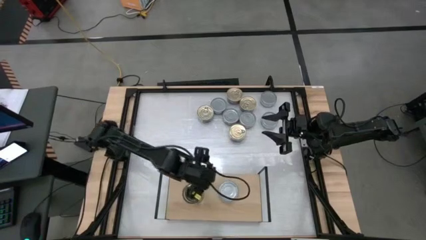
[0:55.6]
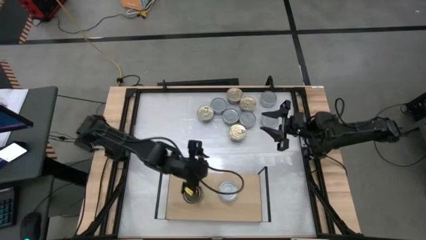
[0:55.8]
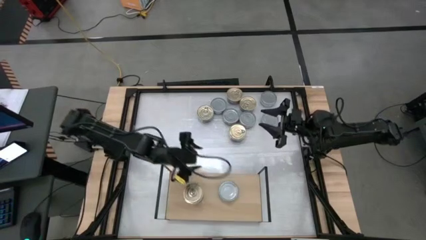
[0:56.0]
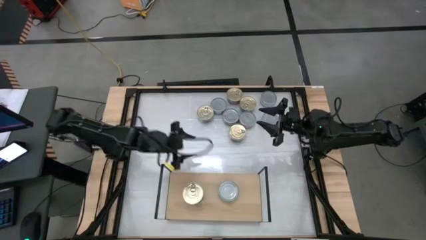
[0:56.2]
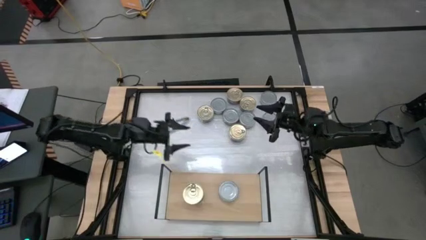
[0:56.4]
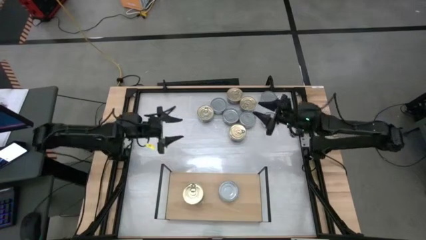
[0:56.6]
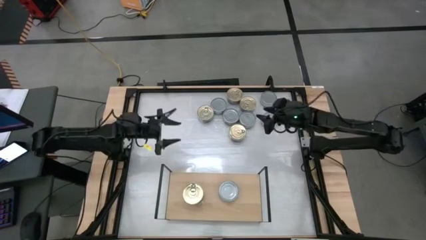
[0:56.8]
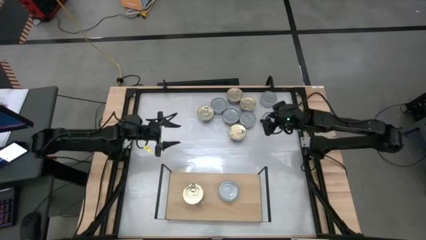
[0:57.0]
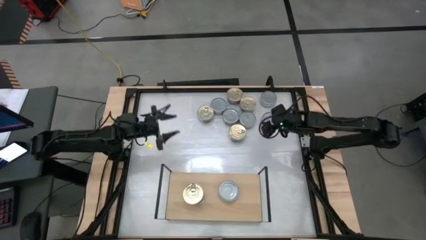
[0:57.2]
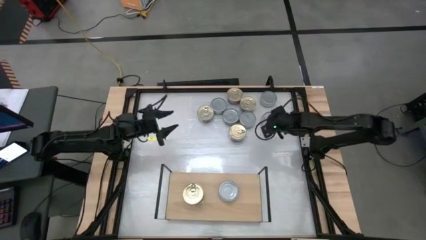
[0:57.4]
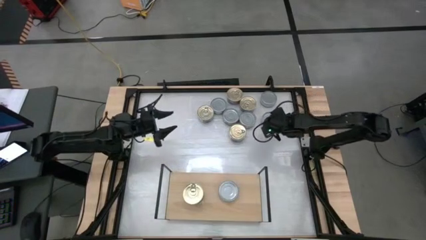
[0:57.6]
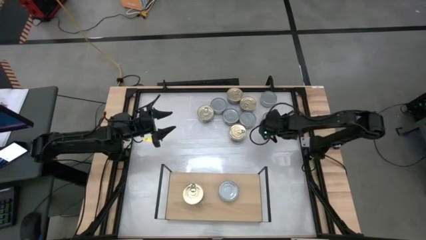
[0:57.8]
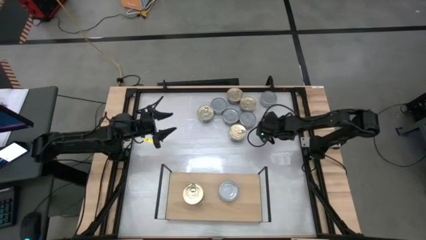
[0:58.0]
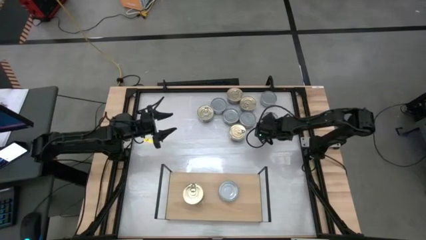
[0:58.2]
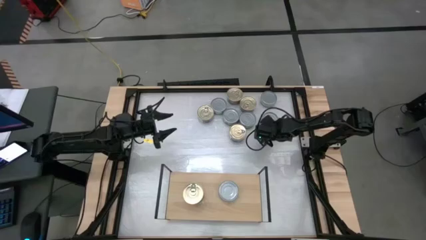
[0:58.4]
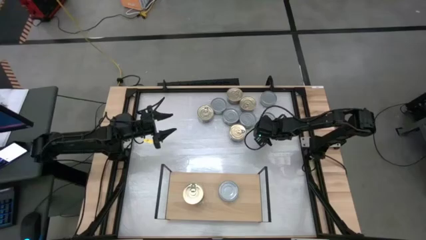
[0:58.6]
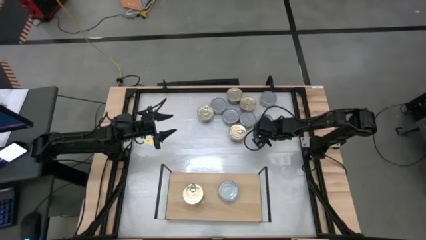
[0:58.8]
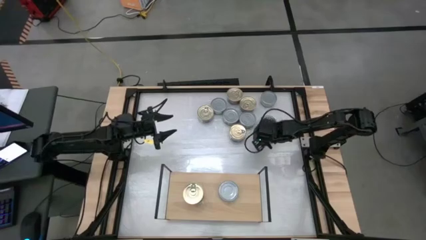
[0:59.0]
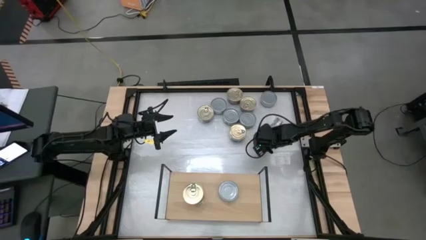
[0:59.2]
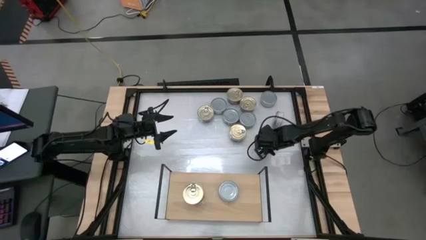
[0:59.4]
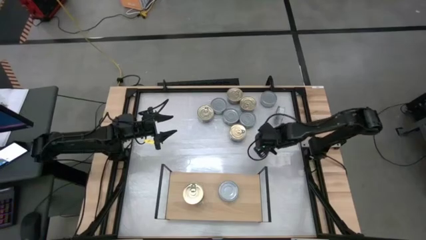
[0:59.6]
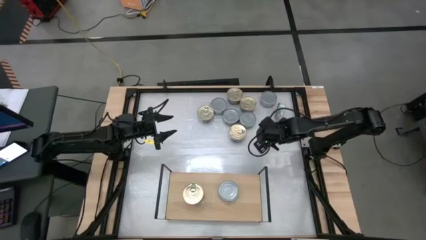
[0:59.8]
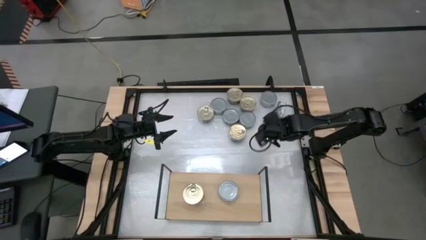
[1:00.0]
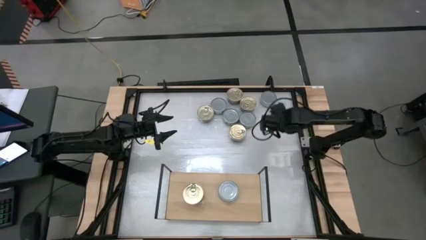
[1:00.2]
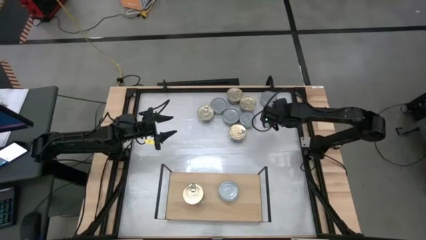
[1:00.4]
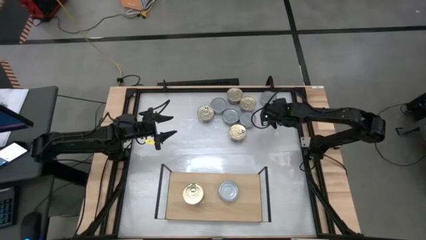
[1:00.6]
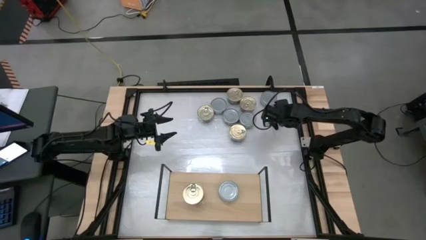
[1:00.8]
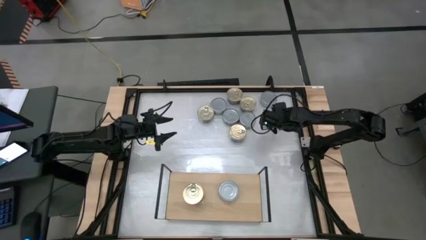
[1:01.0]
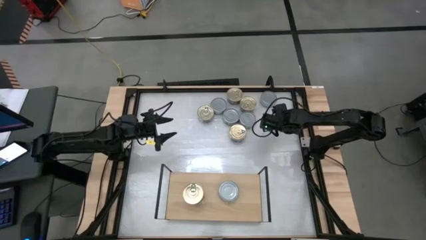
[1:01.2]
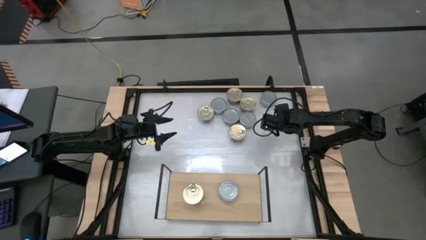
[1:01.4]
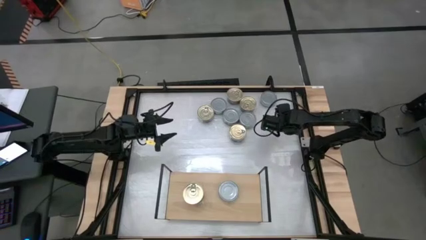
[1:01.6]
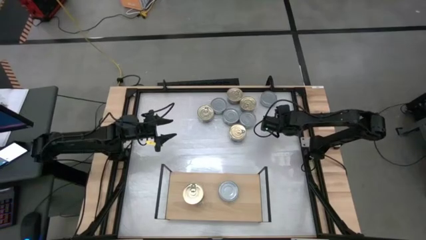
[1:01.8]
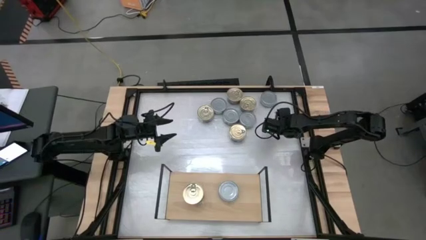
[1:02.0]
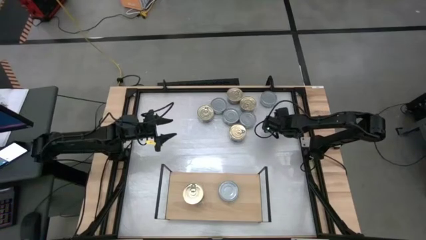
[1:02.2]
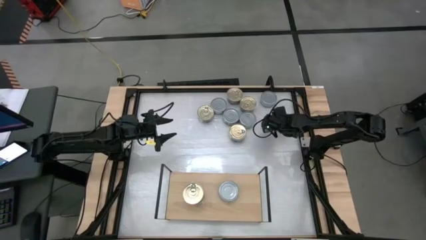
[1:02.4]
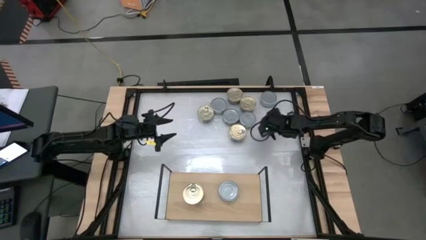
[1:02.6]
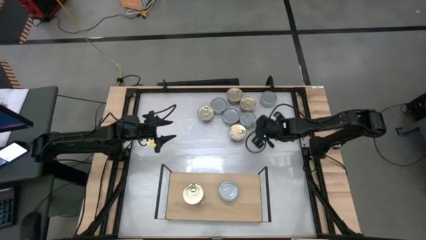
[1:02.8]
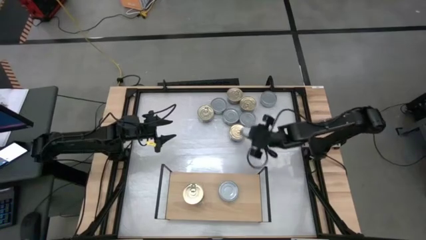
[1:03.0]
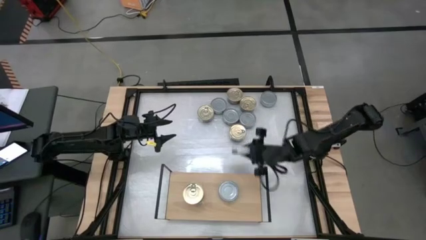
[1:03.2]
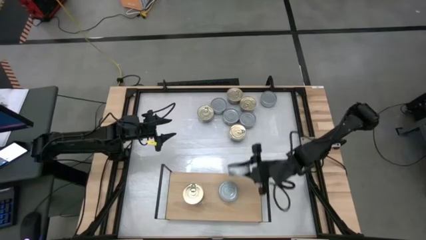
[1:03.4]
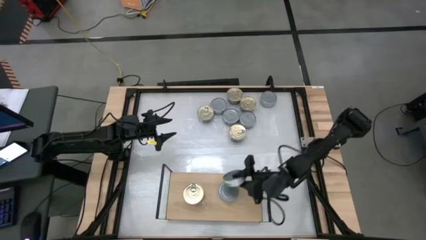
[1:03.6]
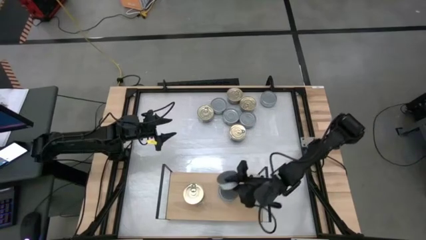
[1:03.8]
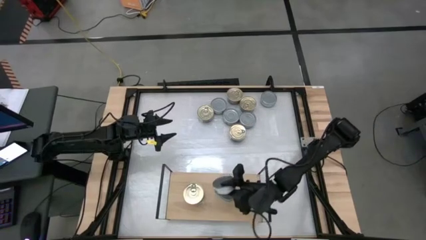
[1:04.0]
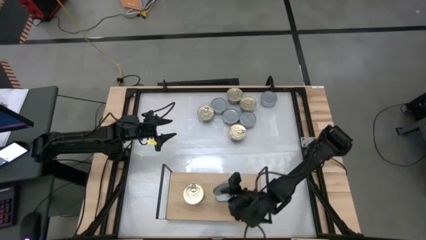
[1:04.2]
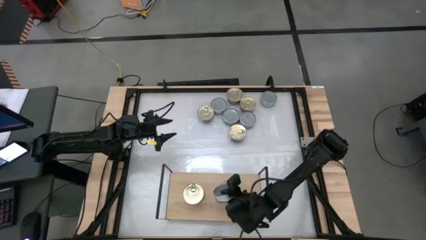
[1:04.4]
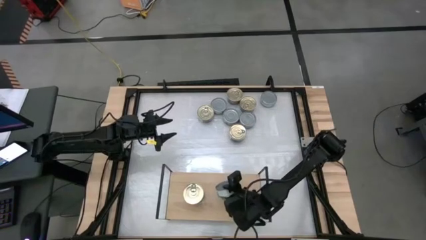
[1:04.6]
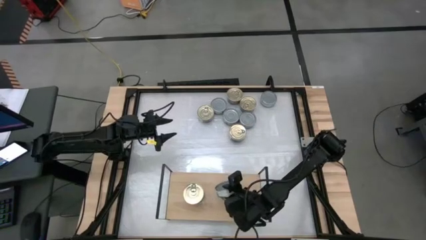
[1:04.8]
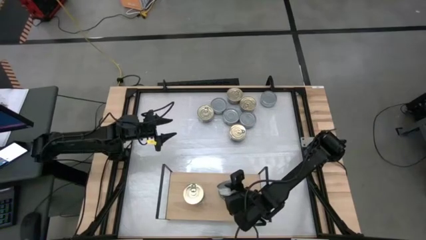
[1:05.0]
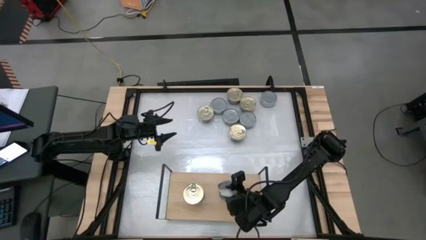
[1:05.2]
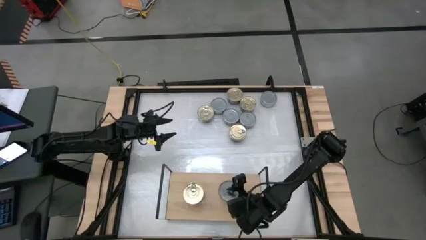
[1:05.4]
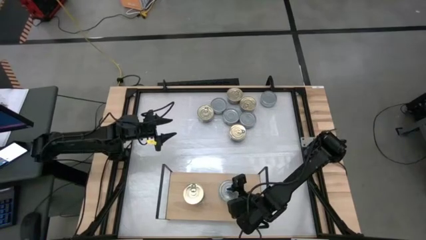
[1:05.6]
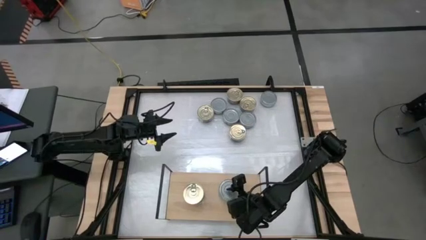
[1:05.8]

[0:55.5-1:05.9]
Task: Stack canned seafood by type on shelf
Stack the green tuna can on top of the green tuna can on the shelf

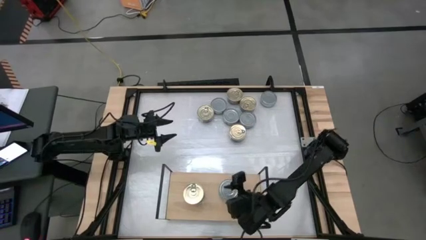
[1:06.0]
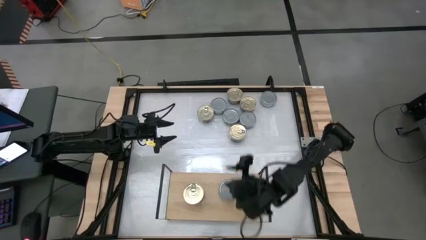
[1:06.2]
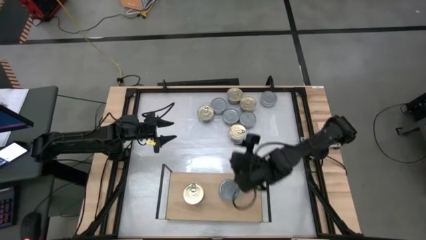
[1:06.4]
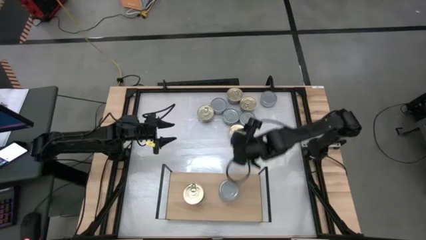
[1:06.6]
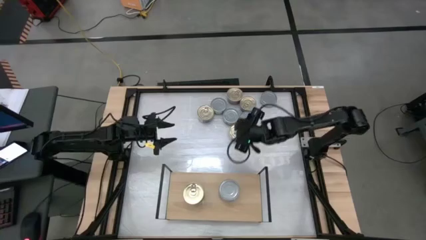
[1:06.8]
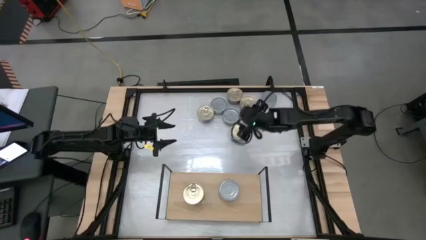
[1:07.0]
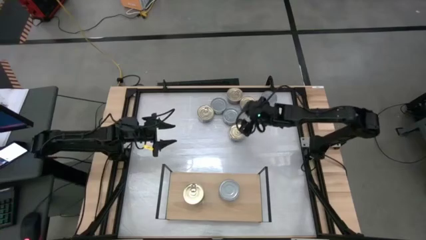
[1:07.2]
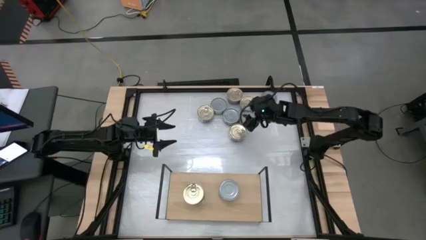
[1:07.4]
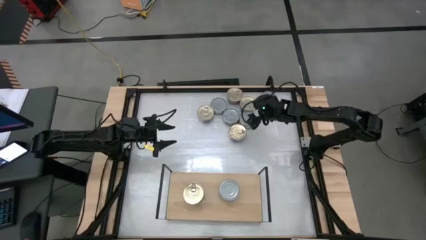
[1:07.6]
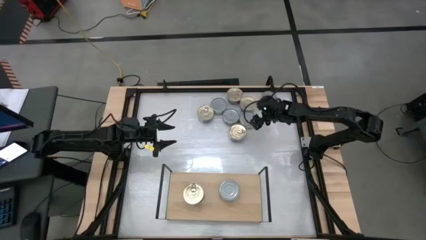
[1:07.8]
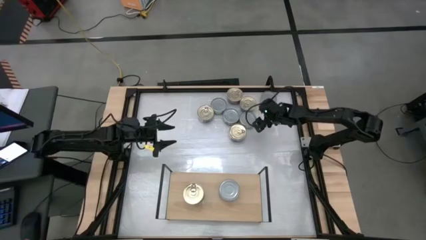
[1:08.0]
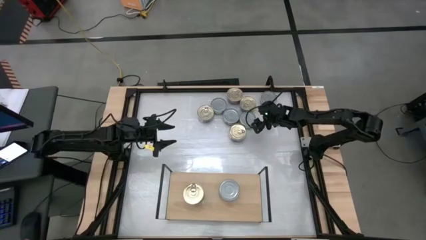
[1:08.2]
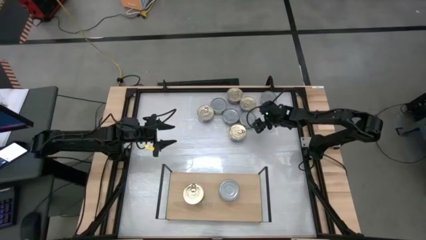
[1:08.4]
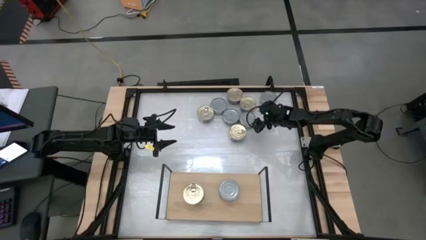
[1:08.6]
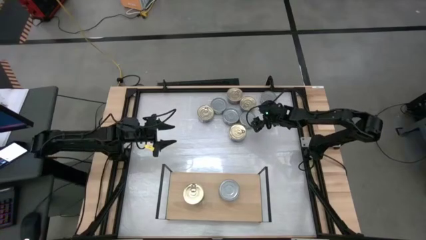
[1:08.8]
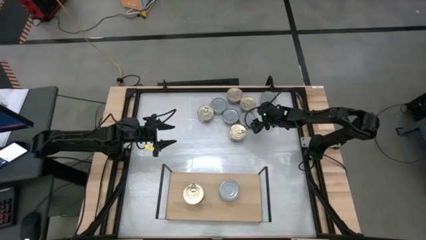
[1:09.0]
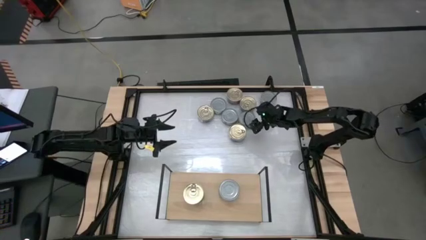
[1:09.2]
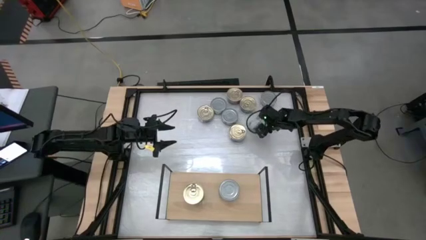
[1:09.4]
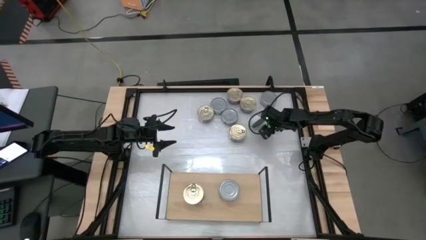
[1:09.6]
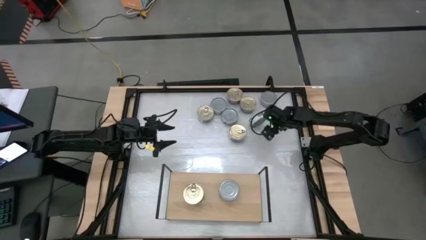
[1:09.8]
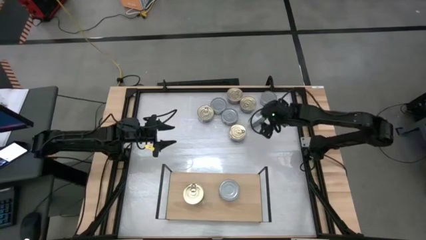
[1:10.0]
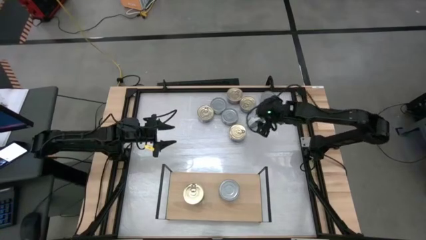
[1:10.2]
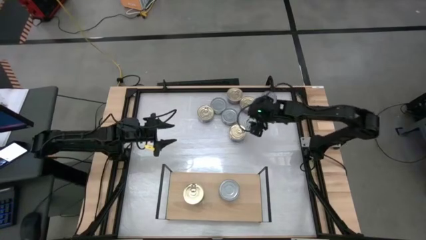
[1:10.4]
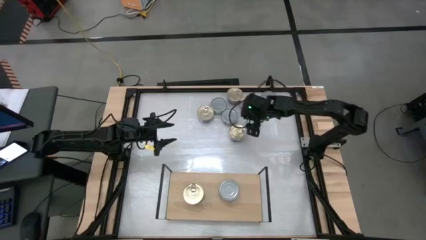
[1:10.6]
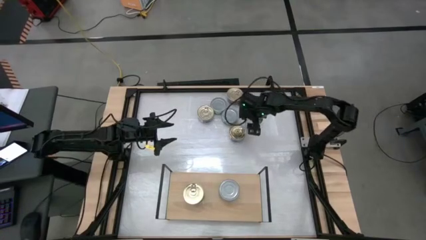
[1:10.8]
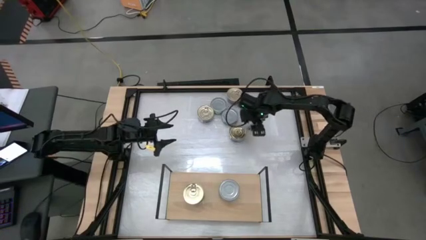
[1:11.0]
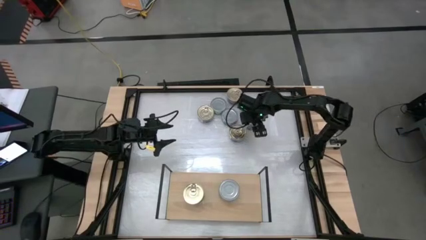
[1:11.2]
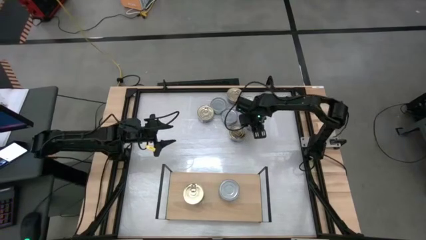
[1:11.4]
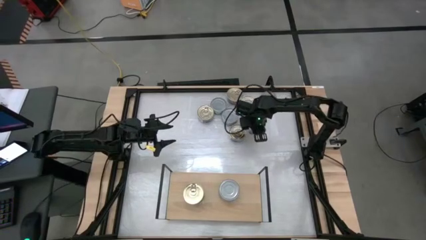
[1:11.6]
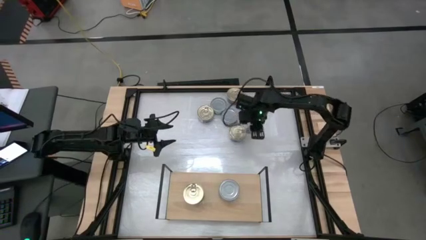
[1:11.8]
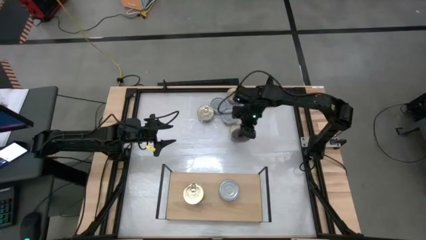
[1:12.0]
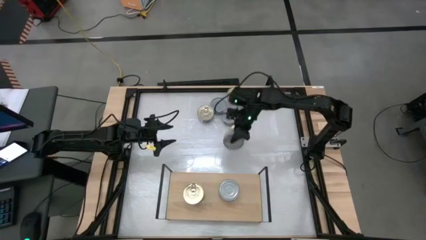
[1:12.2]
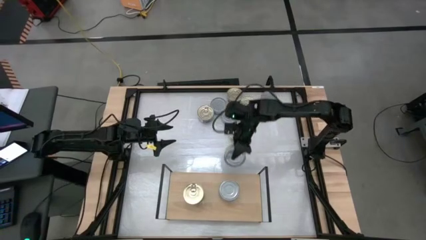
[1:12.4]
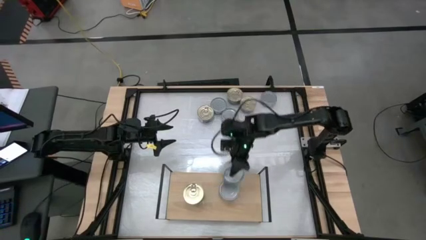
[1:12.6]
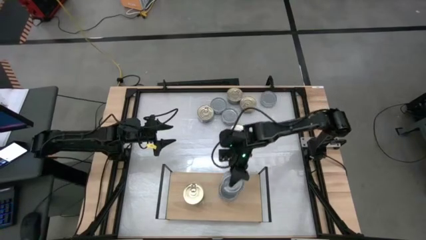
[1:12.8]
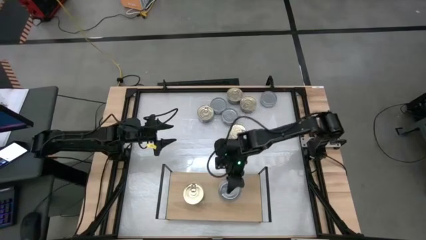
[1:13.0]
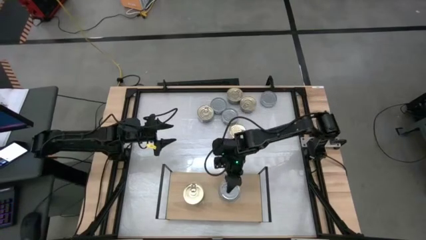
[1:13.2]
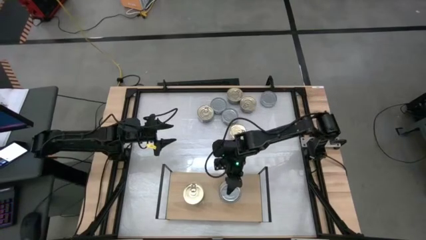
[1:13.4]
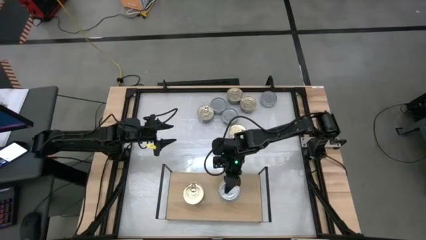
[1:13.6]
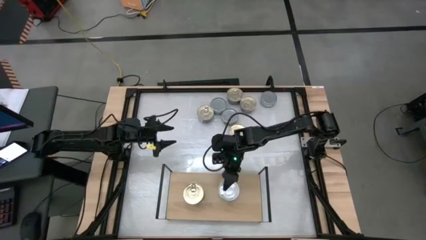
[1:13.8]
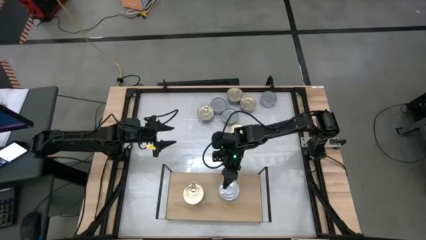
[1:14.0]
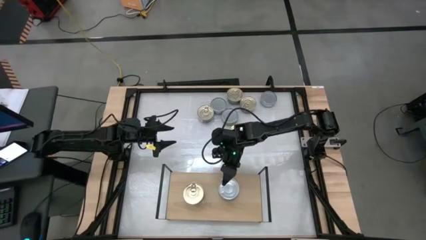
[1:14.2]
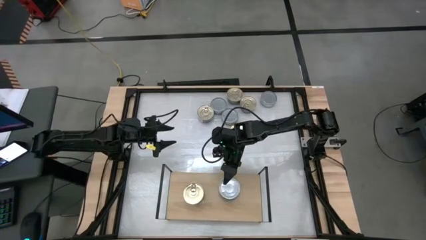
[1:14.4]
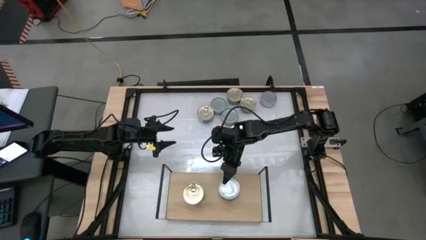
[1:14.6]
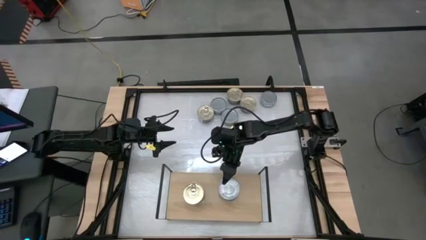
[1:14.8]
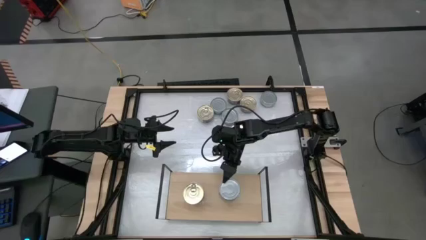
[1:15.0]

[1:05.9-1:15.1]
Stack the green tuna can on top of the green tuna can on the shelf
